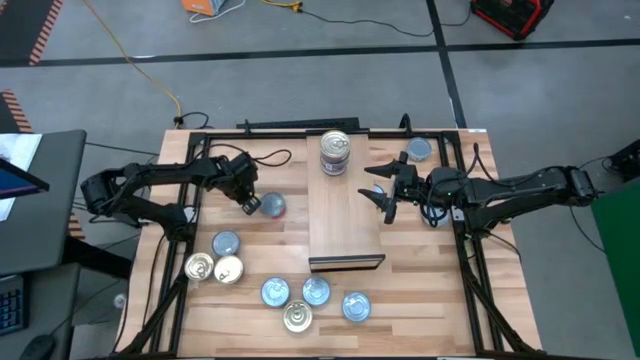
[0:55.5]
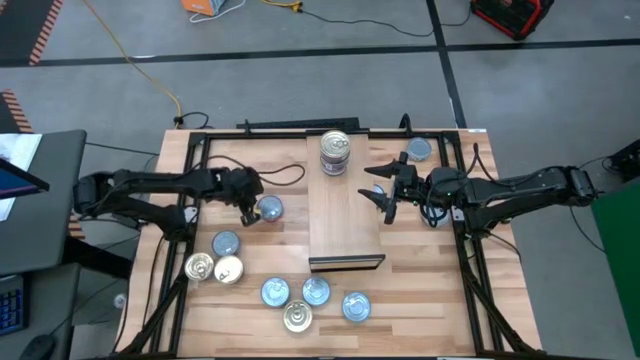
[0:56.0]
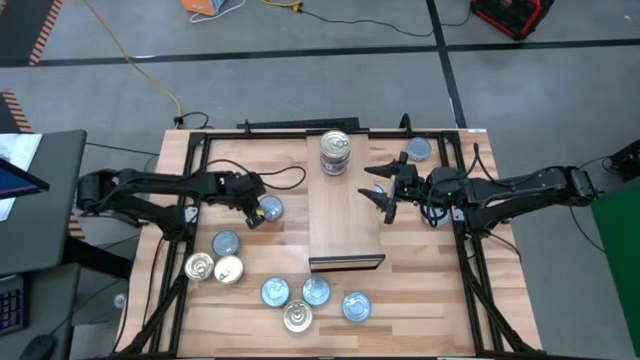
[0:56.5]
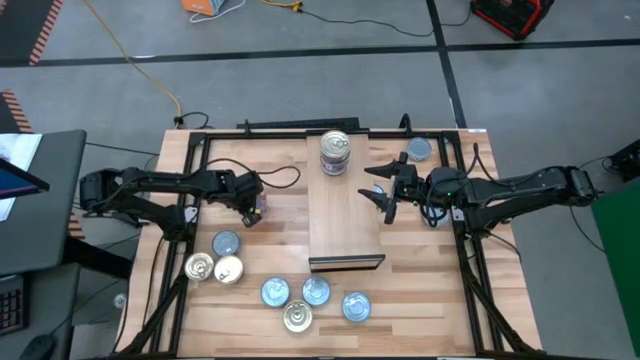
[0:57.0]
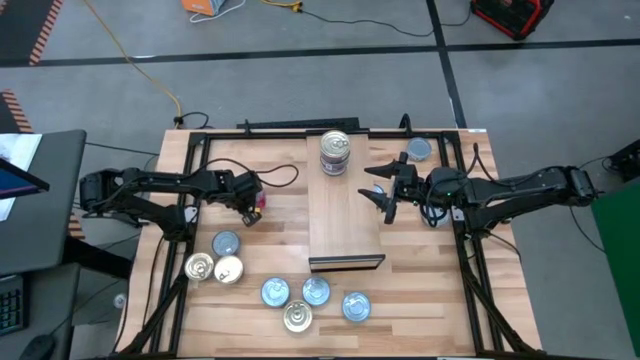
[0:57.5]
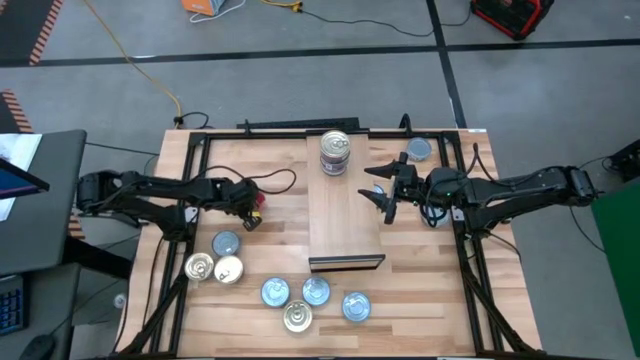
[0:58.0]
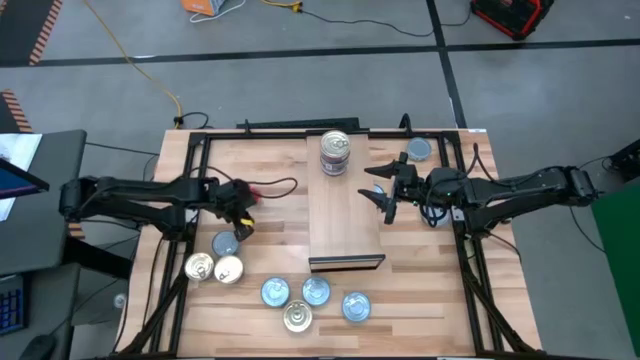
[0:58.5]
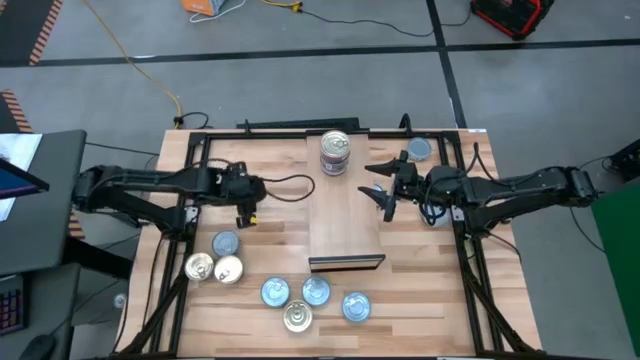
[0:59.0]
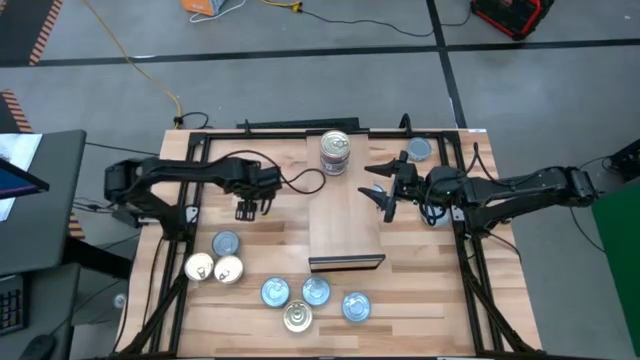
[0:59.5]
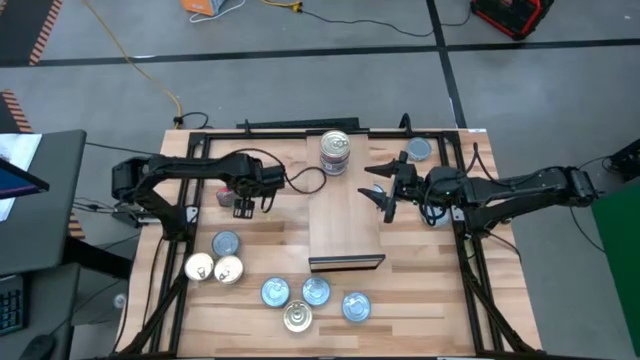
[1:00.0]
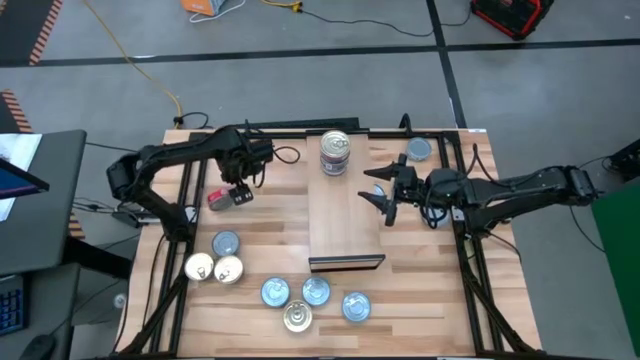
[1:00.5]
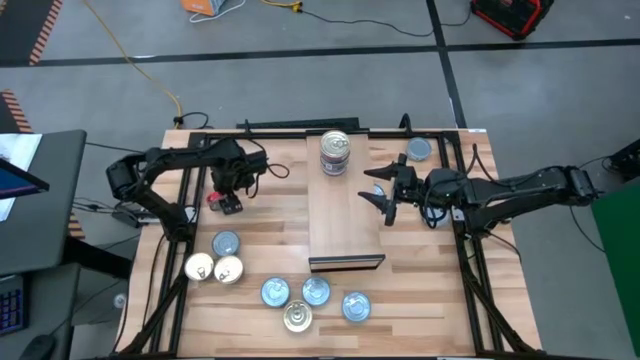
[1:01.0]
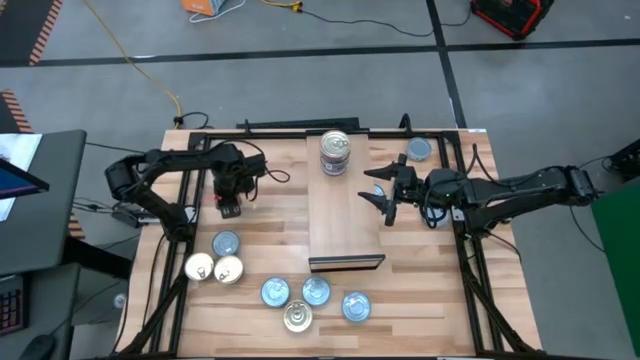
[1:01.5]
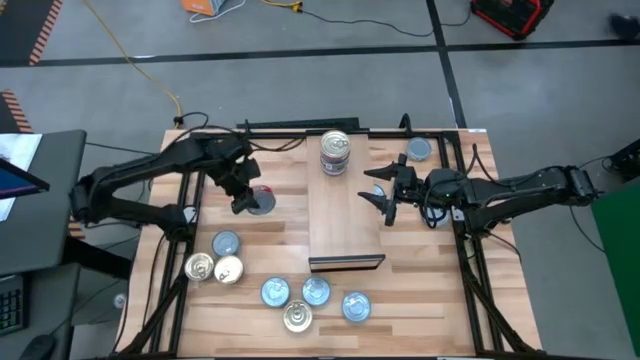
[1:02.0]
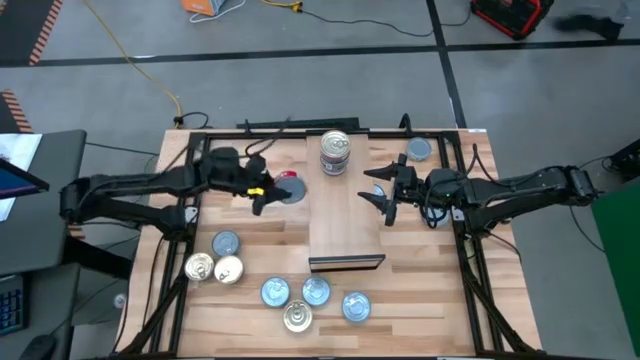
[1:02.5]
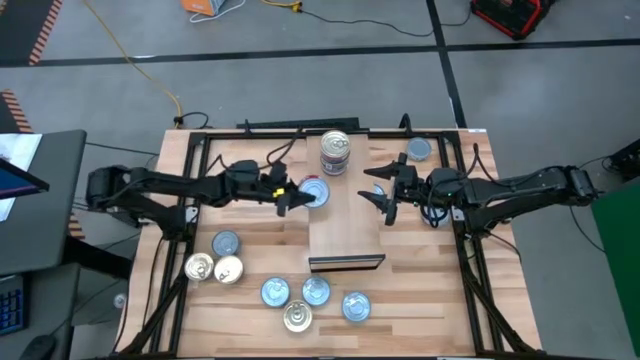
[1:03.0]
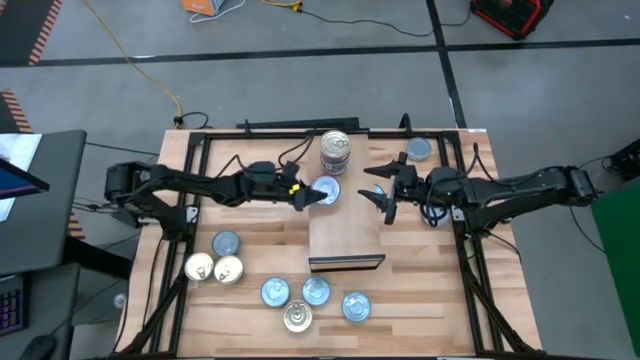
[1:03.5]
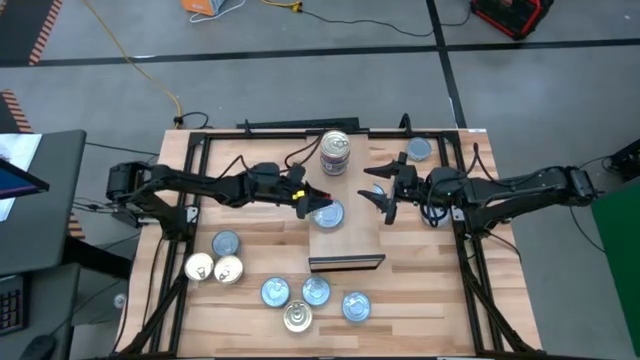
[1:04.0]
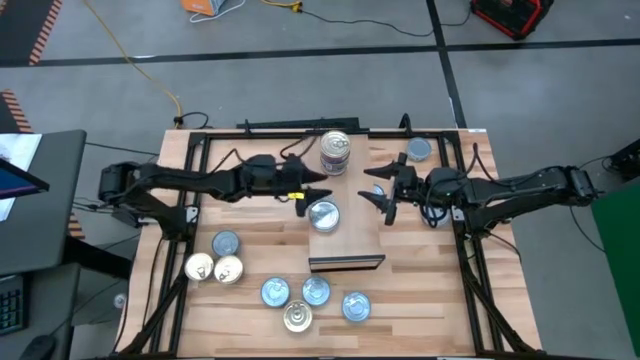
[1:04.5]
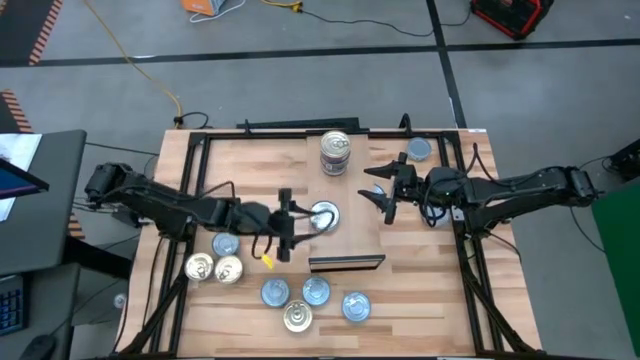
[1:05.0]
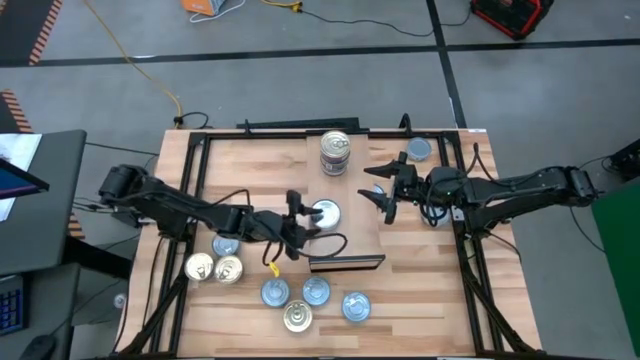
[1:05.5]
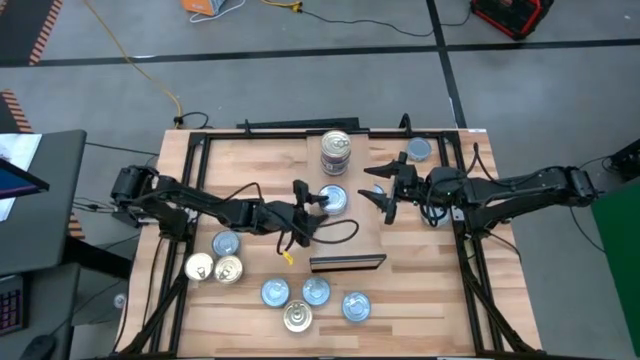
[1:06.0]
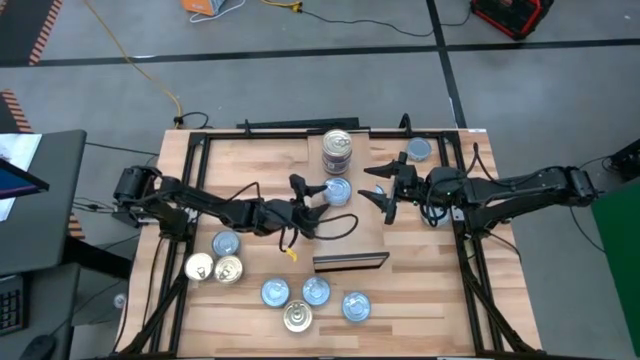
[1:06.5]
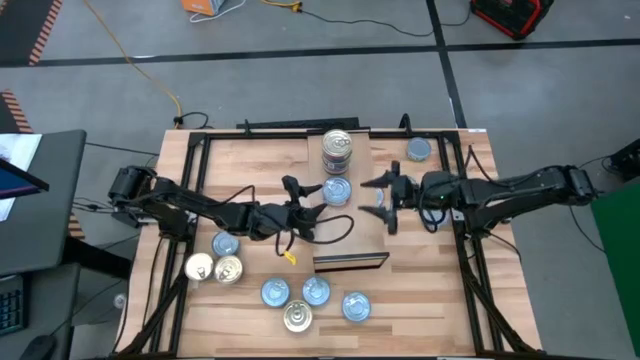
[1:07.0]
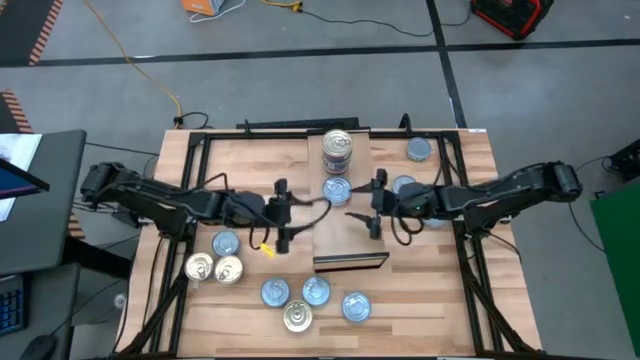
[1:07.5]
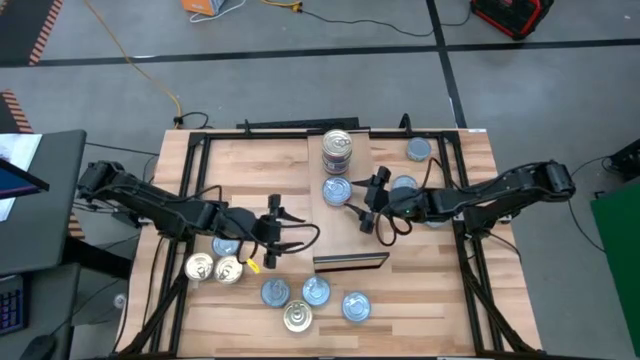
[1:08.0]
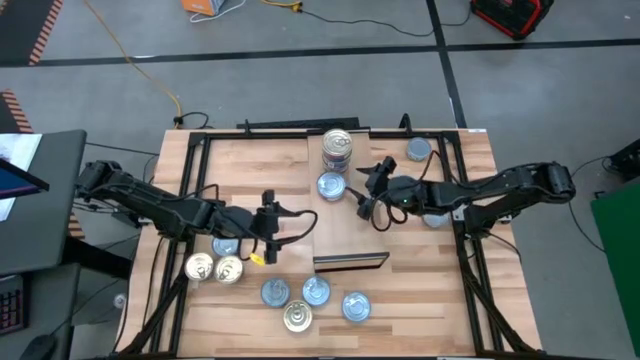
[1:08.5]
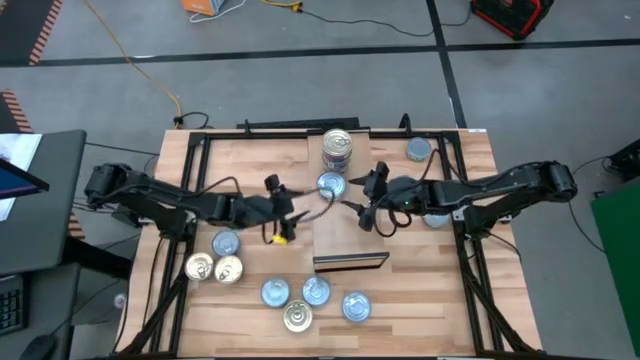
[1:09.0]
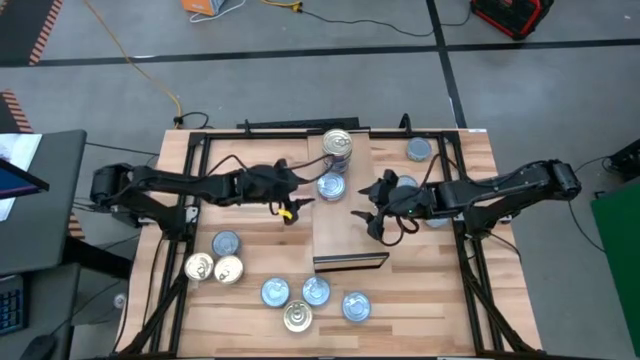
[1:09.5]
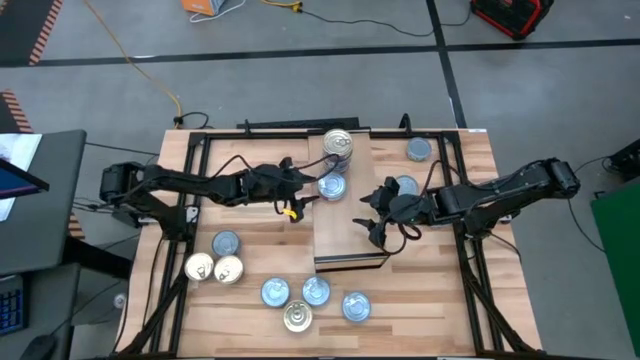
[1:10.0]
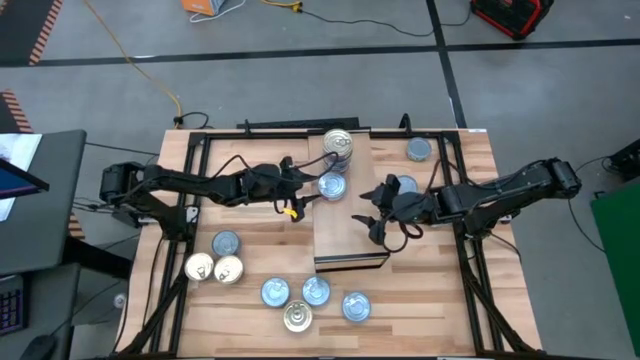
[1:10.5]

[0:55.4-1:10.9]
Task: Stack canned seafood by type on shelf
Put the red tuna can on the shelf

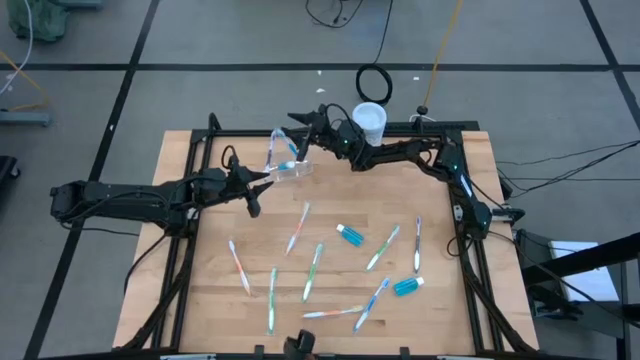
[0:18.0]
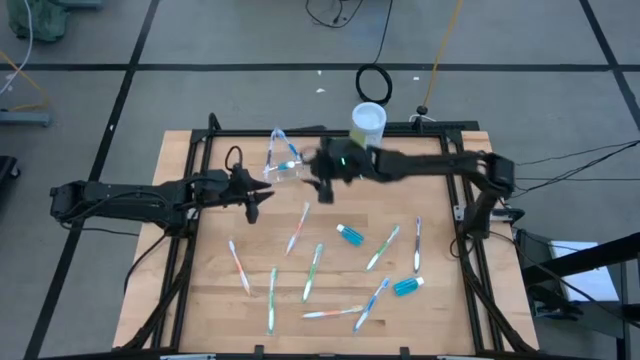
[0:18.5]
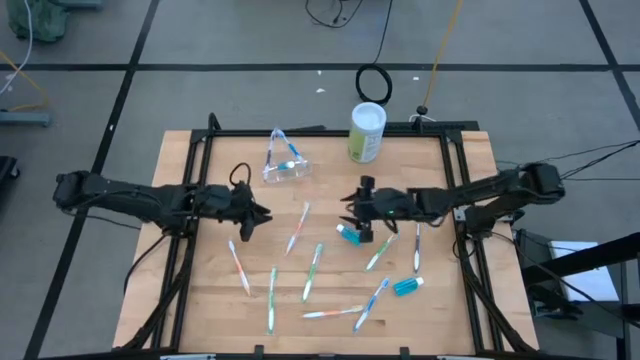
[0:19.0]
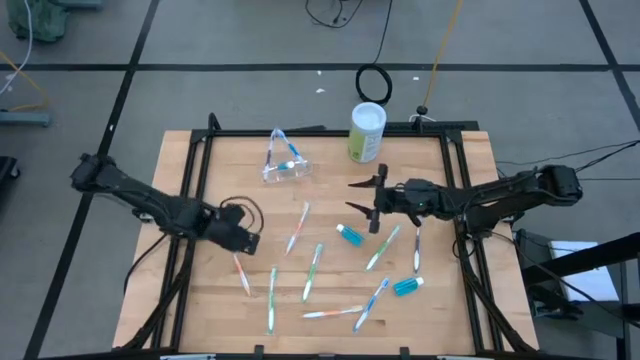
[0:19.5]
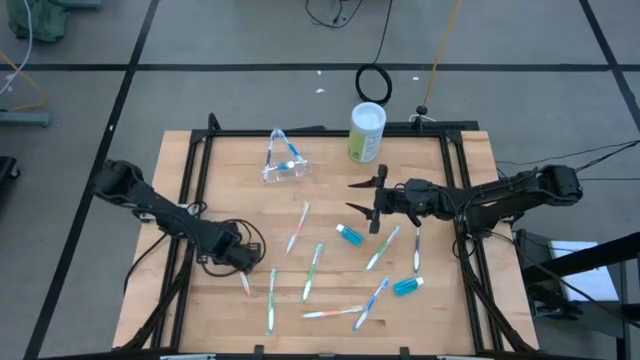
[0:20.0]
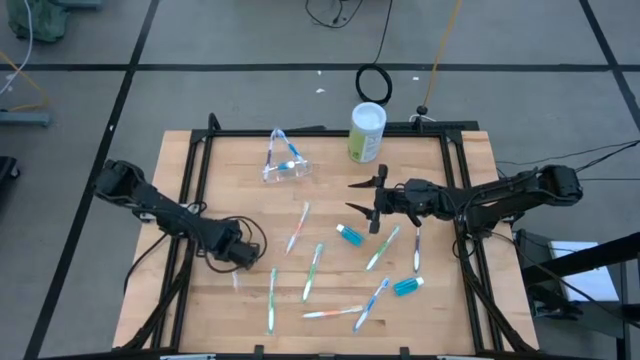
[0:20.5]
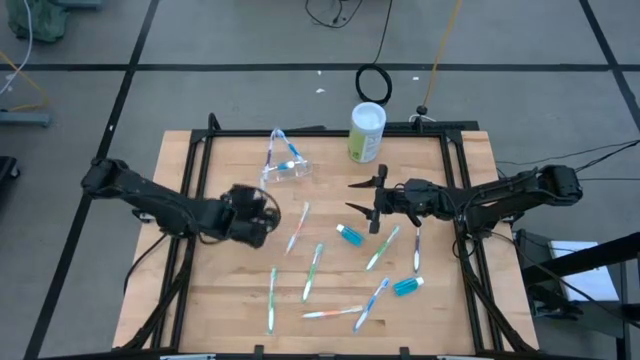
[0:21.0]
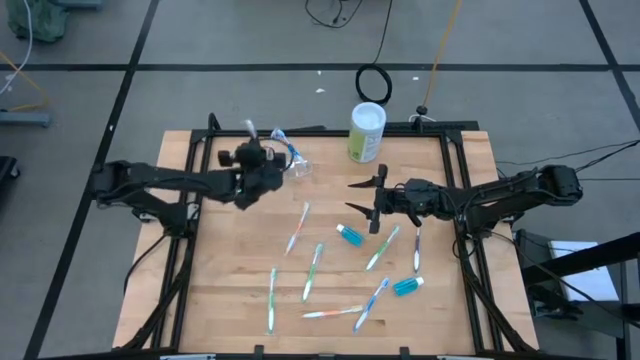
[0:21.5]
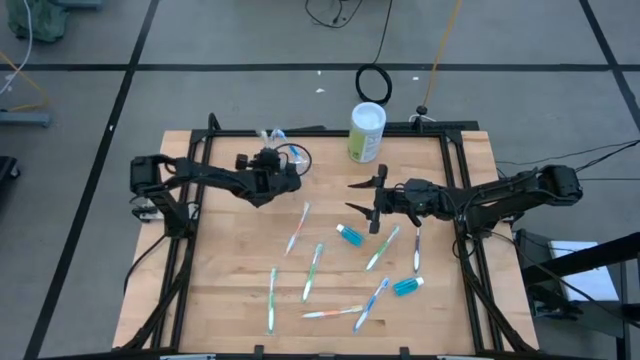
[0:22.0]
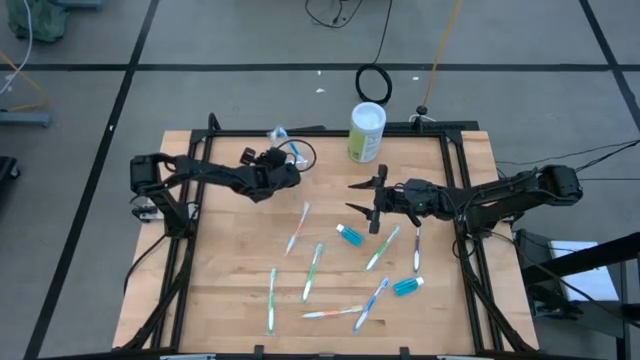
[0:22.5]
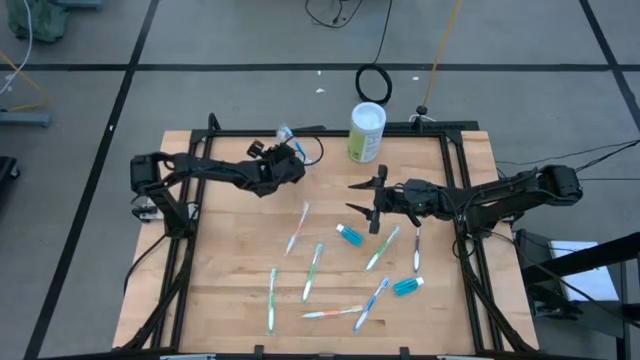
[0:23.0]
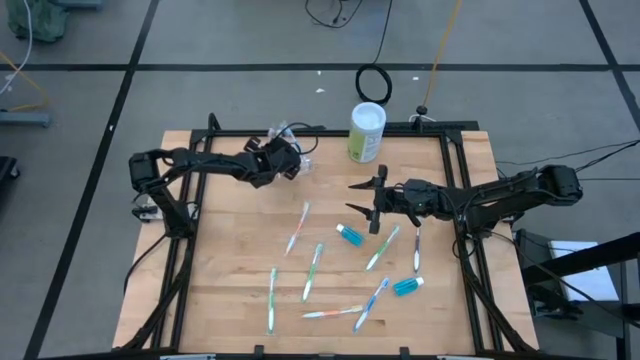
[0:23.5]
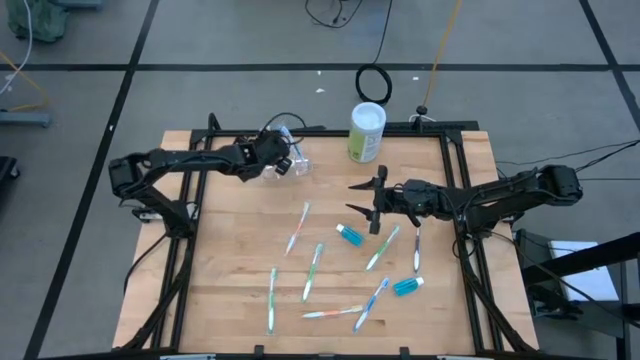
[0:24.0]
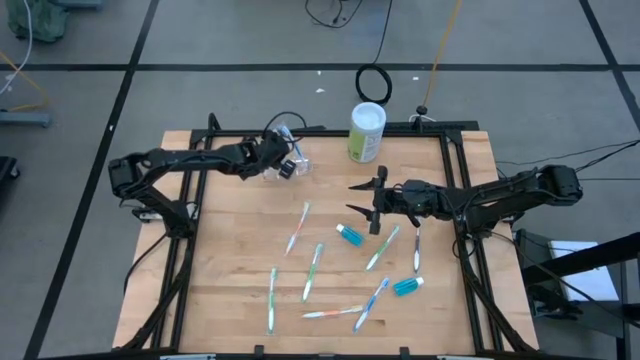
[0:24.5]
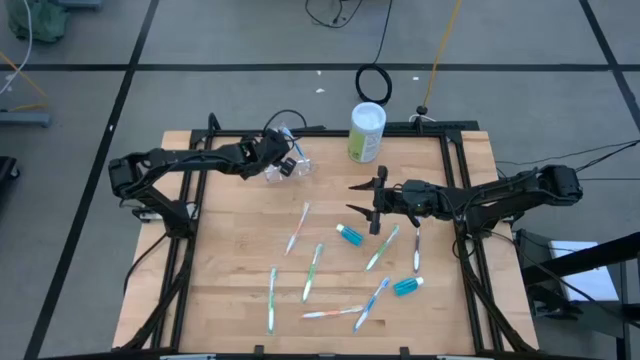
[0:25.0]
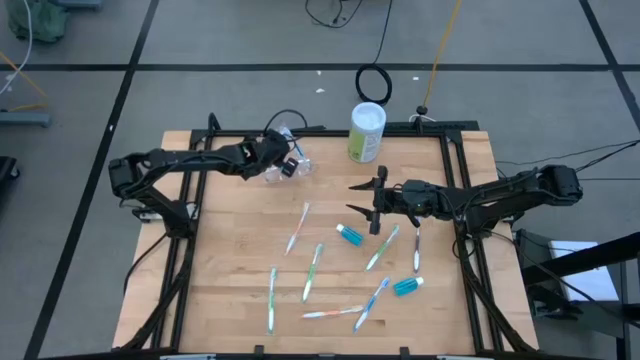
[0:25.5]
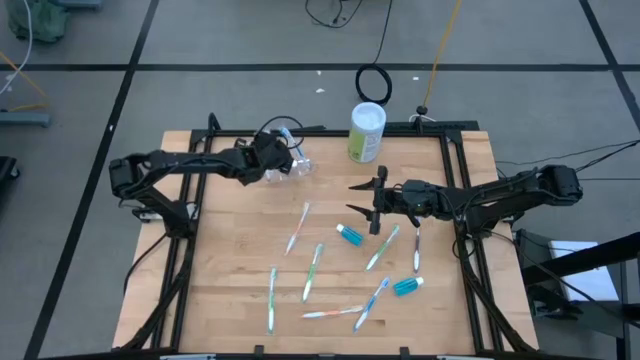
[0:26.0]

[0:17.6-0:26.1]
Task: Pick & Place toothbrushing station
Put the middle left orange toothbrush into the transparent organizer
